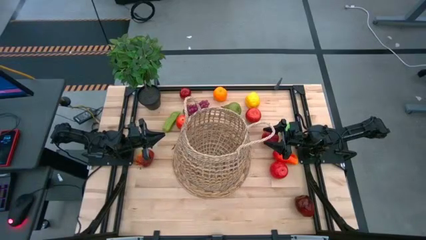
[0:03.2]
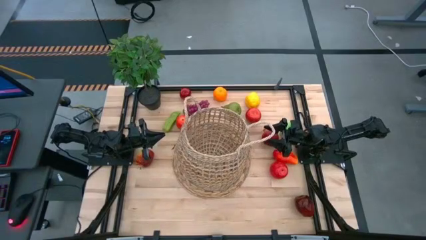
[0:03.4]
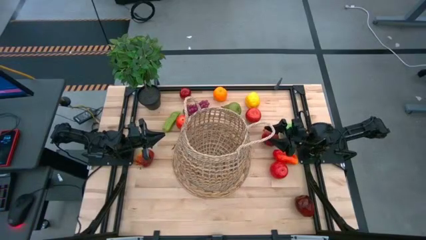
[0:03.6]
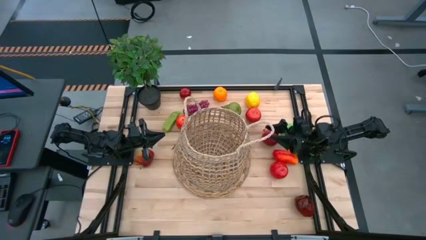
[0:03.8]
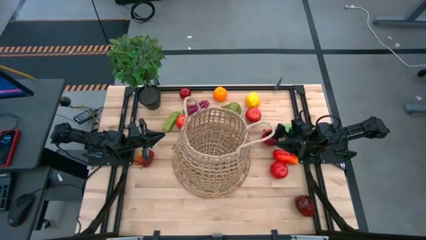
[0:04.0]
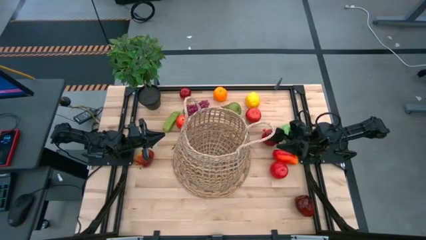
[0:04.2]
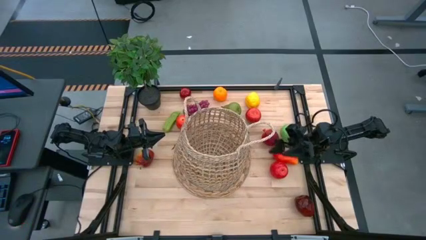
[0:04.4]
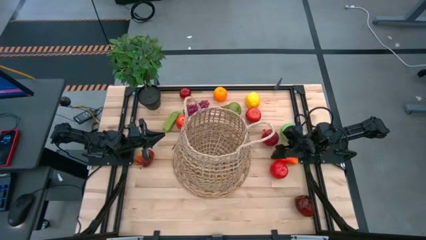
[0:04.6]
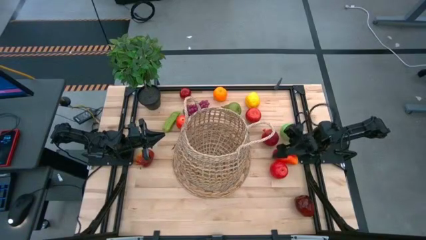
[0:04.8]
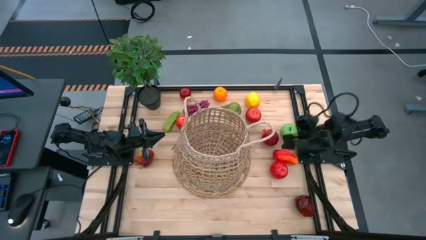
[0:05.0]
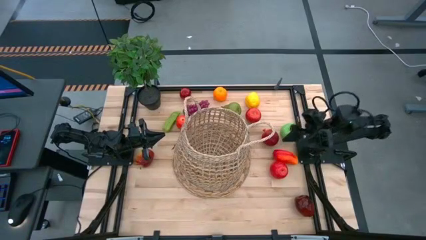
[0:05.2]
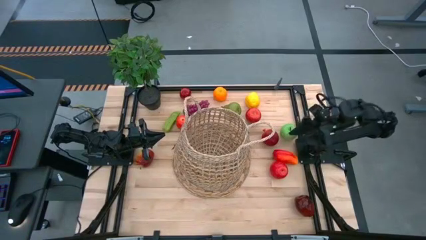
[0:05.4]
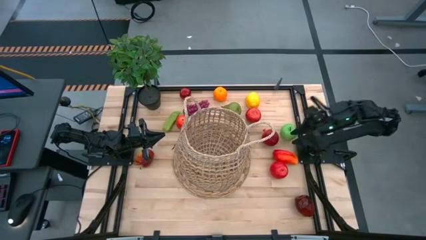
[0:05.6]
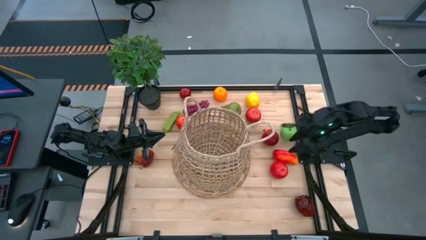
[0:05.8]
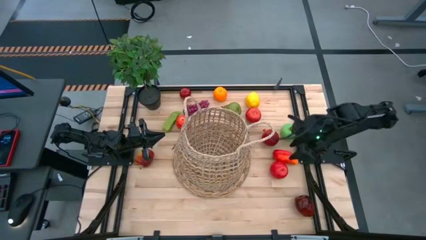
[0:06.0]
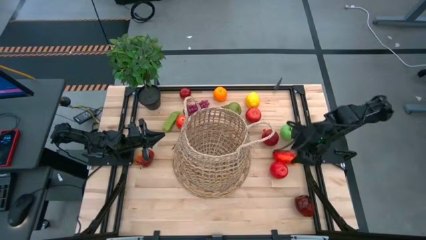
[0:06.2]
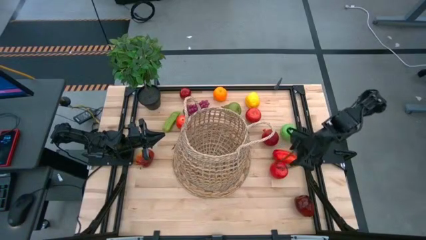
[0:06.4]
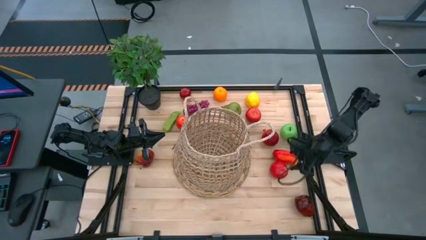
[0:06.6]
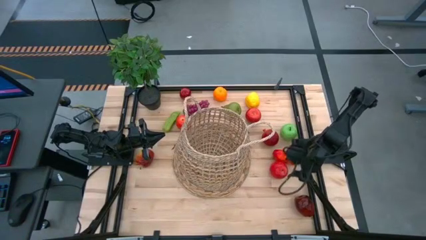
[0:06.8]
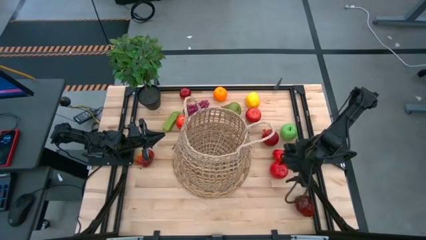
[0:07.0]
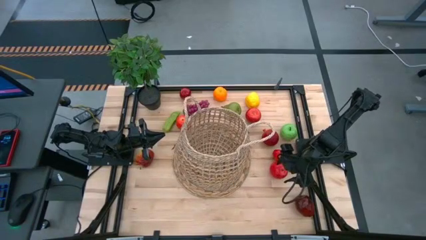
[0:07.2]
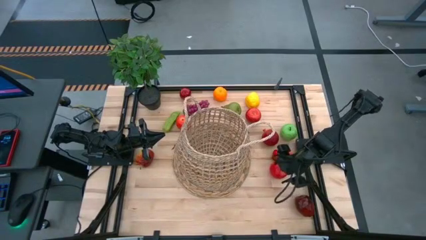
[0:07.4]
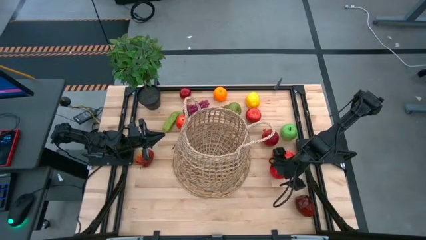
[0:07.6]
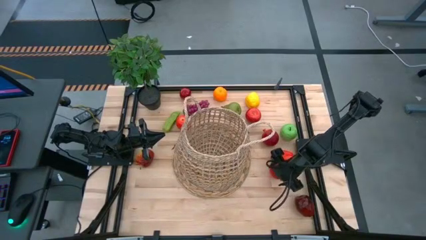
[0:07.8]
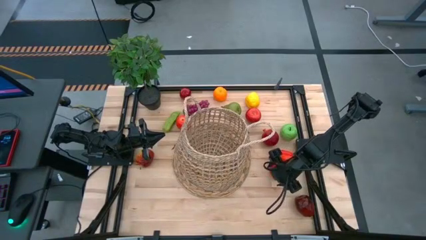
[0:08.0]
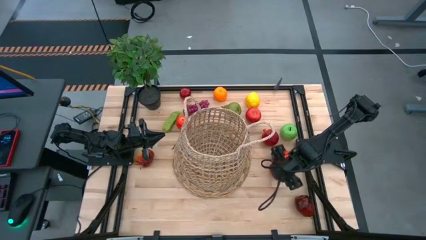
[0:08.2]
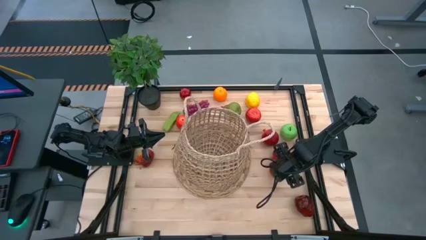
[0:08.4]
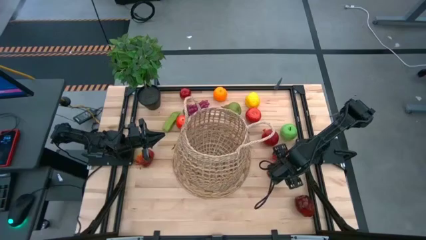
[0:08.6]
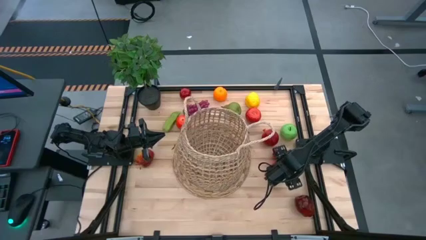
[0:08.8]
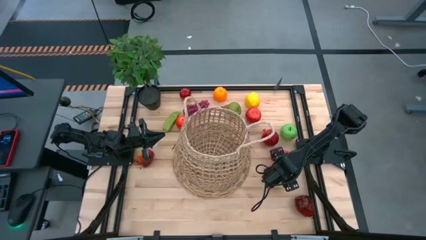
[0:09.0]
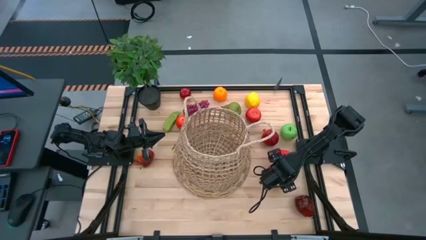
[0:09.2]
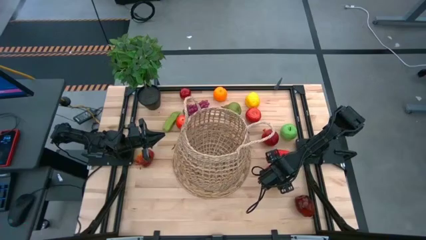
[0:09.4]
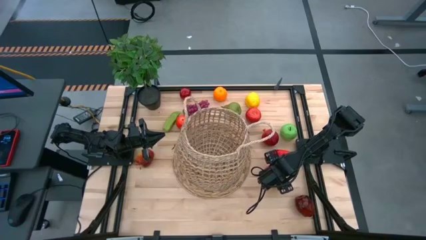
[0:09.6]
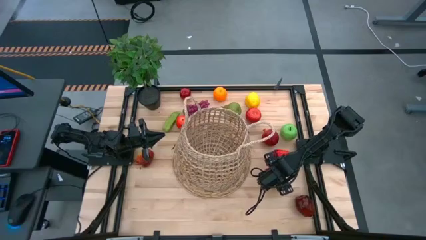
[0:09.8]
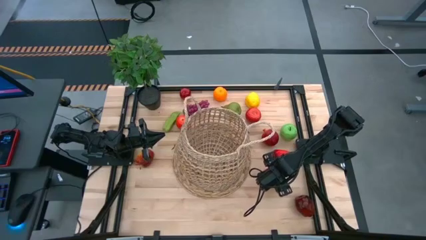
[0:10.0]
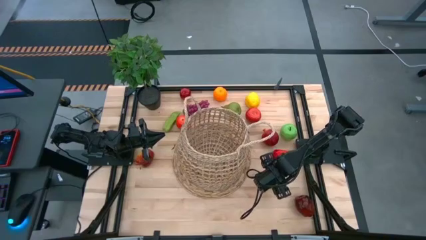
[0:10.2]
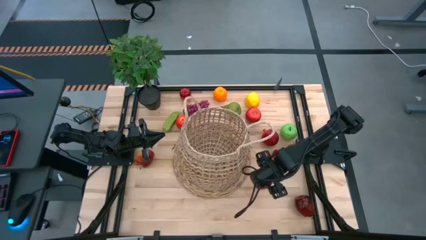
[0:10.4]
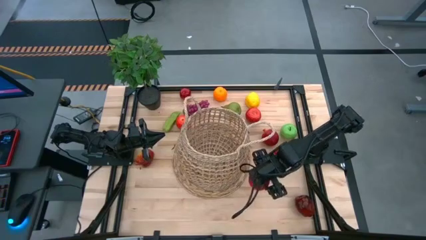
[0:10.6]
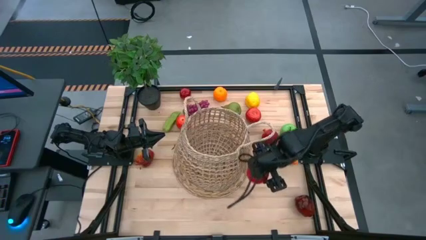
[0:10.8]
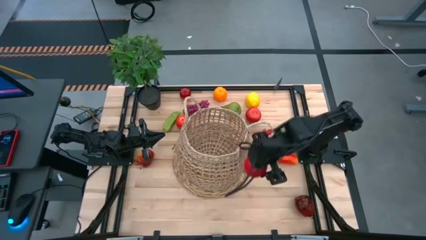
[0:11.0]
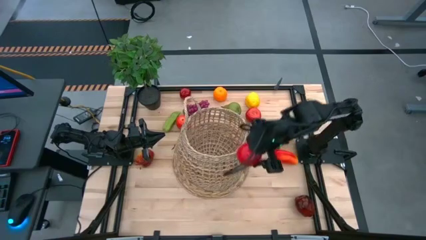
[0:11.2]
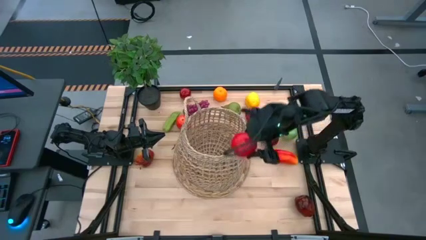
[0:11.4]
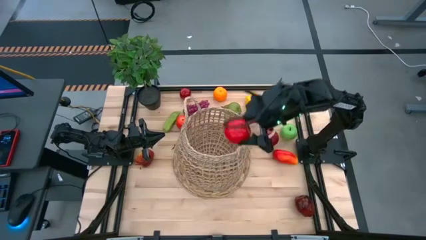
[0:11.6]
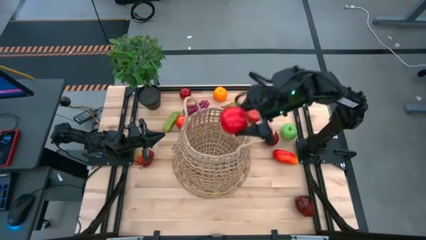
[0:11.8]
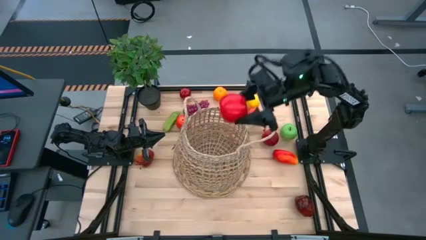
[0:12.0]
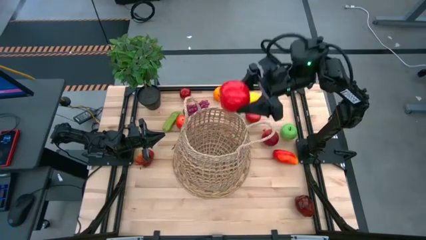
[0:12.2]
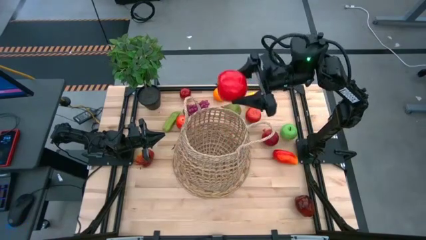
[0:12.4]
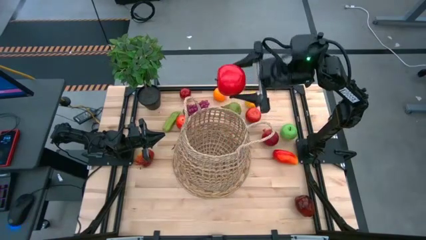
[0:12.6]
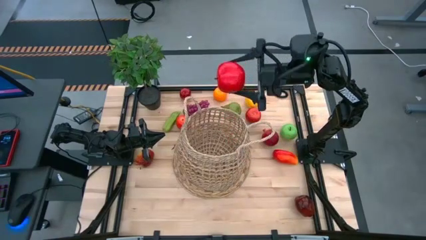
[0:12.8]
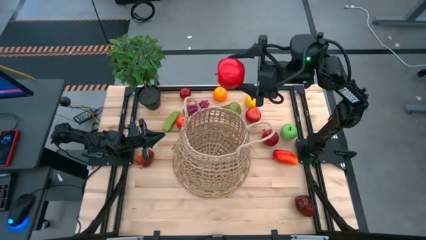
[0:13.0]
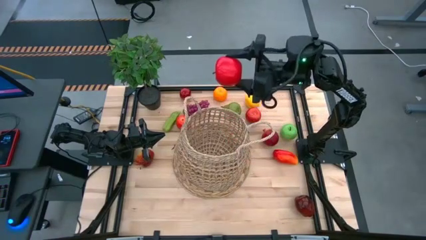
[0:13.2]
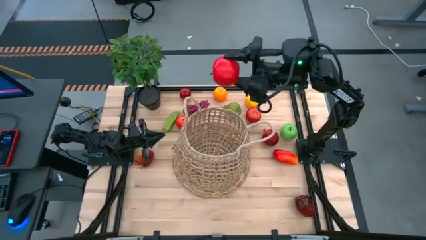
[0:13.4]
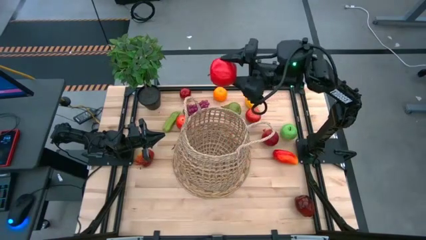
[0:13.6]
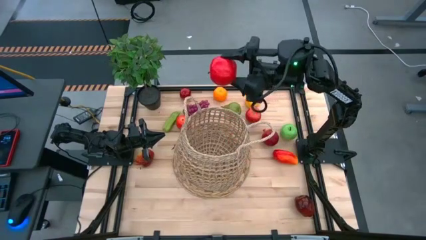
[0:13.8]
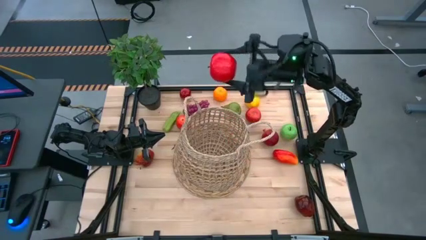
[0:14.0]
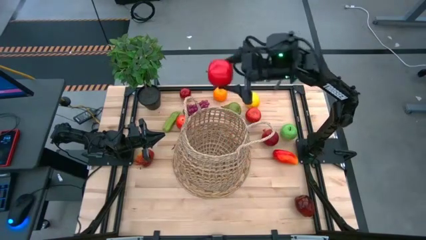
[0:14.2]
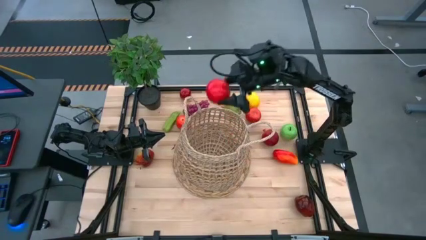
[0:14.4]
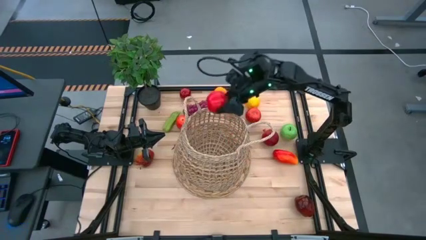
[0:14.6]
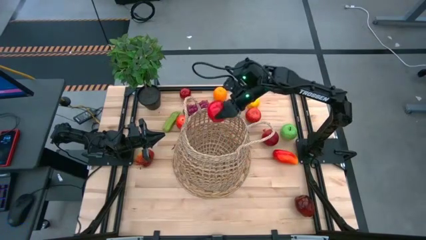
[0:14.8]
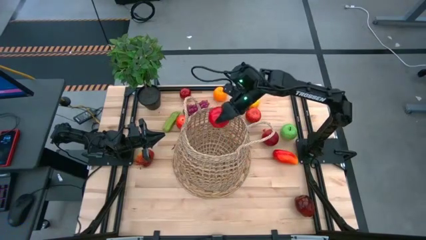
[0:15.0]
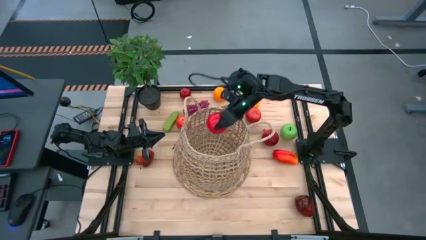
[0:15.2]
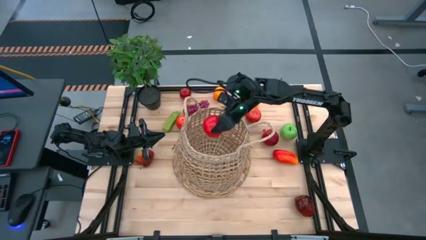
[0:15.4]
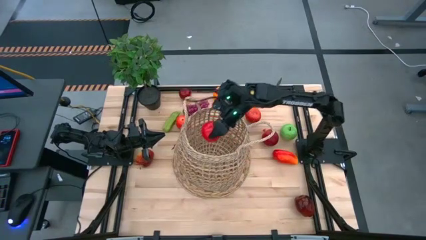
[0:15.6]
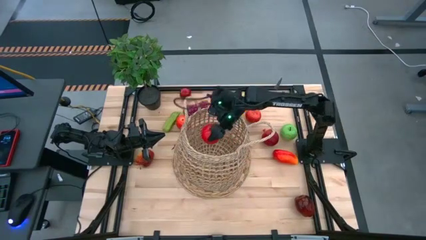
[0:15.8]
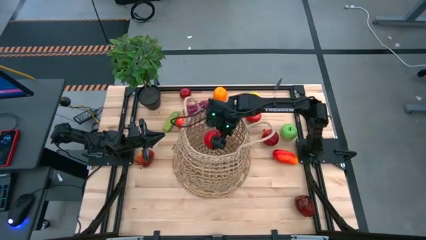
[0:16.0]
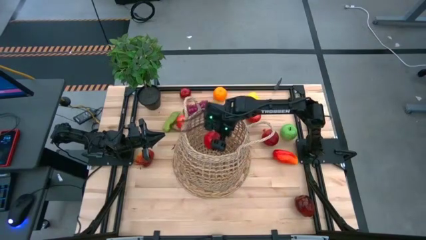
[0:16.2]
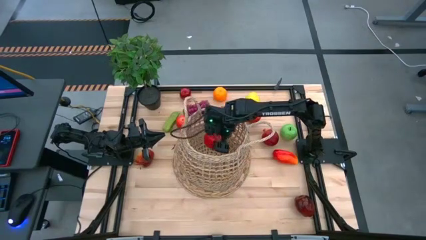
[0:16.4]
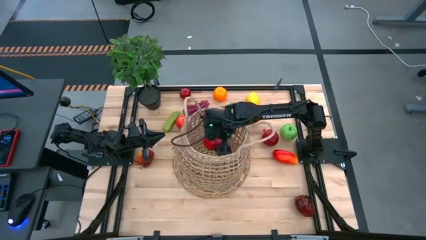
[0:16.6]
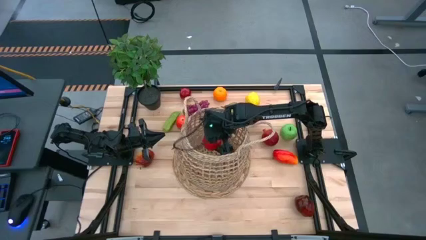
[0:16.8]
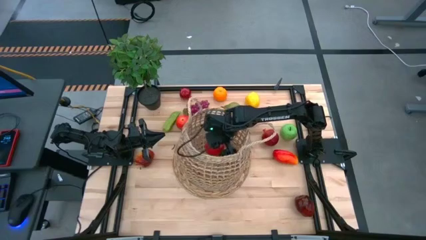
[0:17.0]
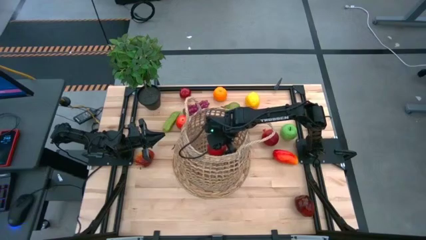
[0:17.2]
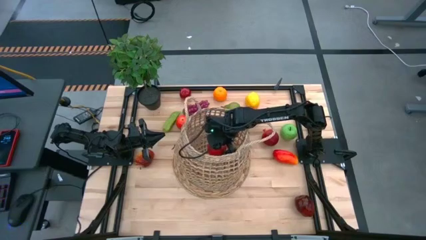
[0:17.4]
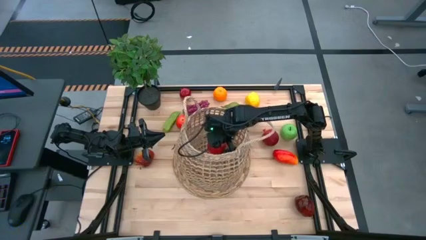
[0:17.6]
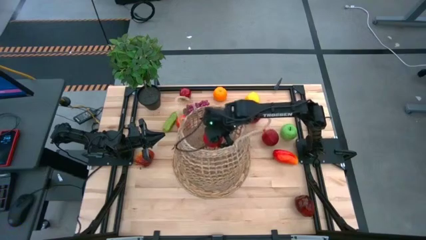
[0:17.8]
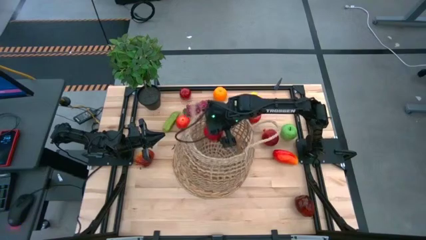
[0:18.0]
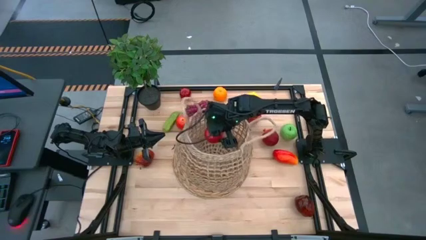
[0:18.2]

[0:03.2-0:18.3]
Task: Build produce basket
Put the red apple into the brown basket
